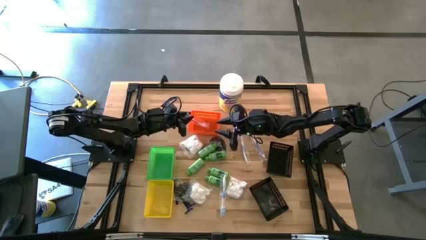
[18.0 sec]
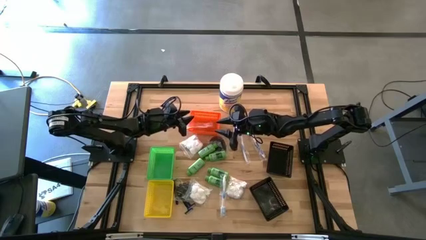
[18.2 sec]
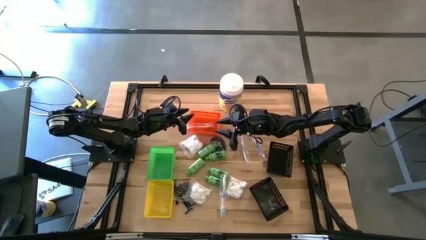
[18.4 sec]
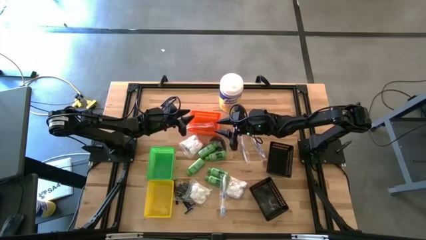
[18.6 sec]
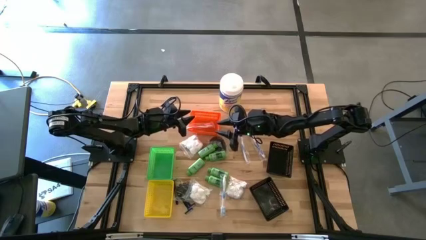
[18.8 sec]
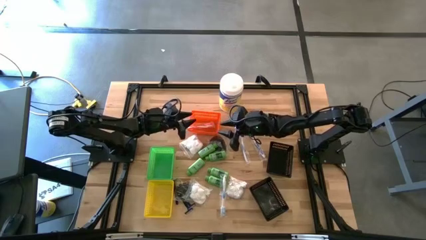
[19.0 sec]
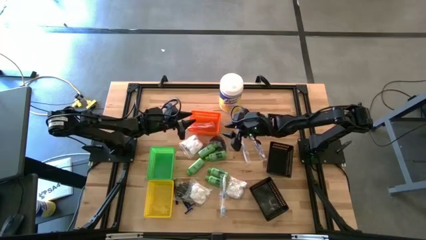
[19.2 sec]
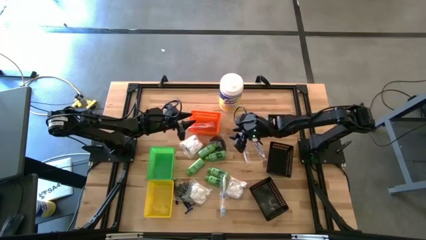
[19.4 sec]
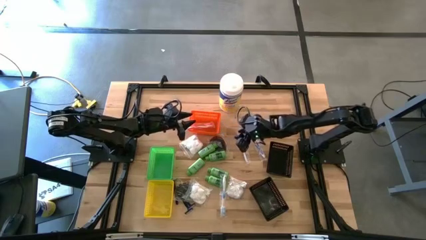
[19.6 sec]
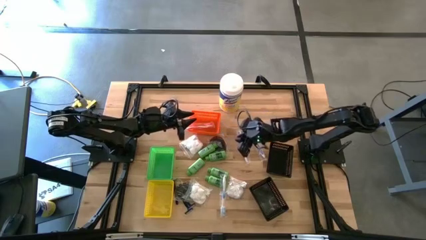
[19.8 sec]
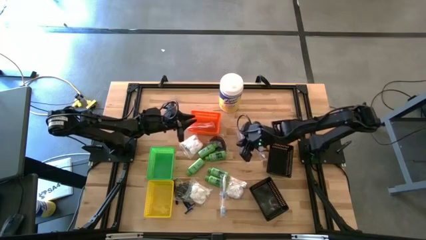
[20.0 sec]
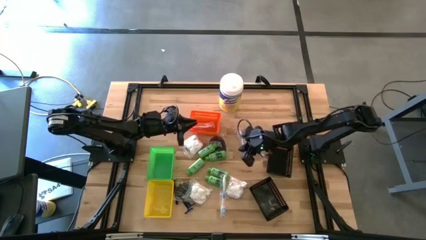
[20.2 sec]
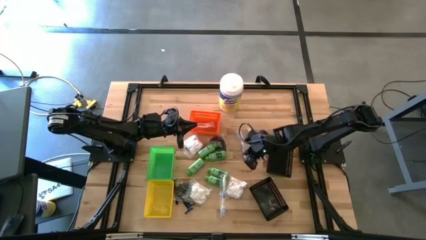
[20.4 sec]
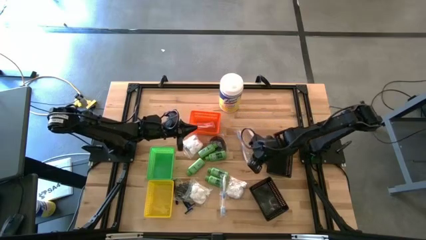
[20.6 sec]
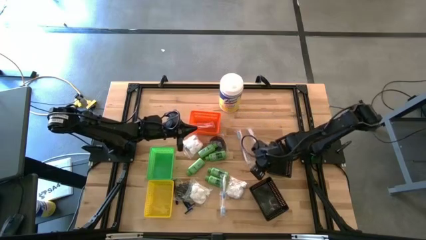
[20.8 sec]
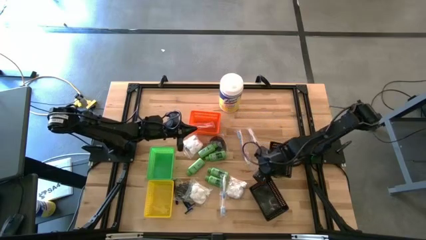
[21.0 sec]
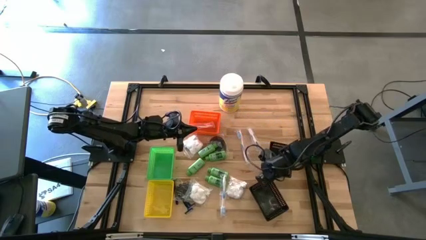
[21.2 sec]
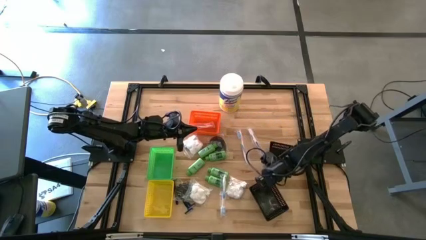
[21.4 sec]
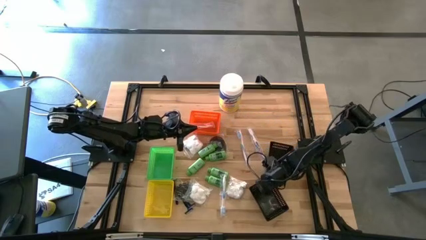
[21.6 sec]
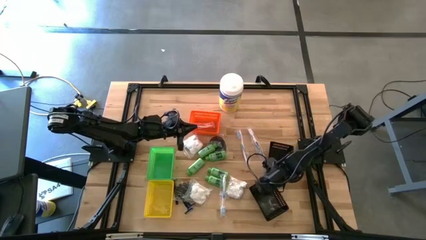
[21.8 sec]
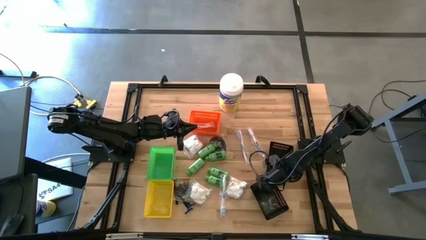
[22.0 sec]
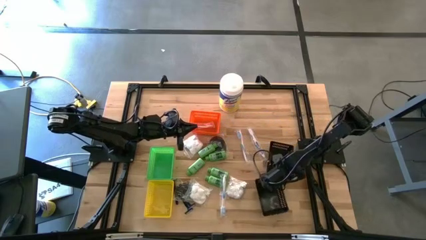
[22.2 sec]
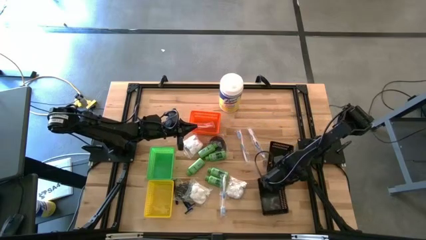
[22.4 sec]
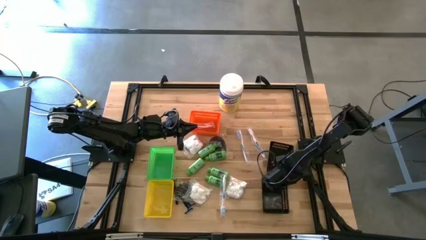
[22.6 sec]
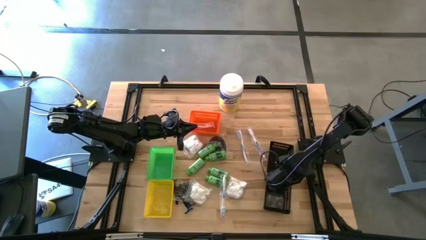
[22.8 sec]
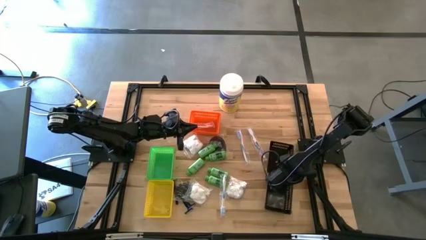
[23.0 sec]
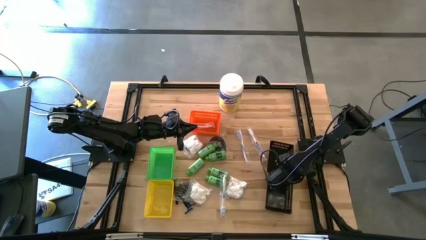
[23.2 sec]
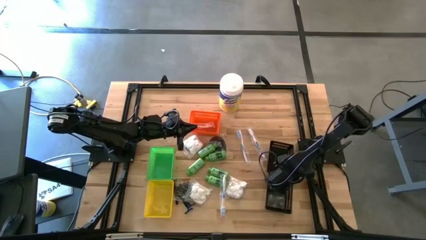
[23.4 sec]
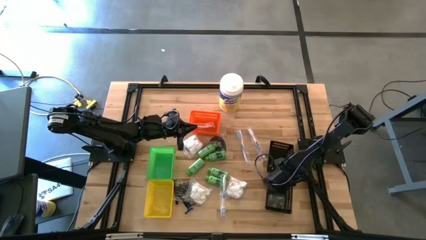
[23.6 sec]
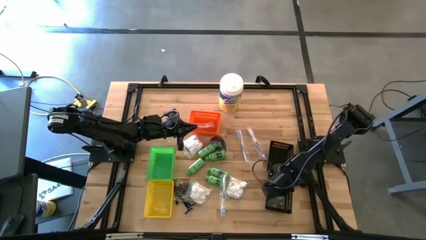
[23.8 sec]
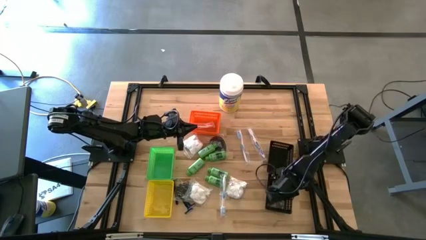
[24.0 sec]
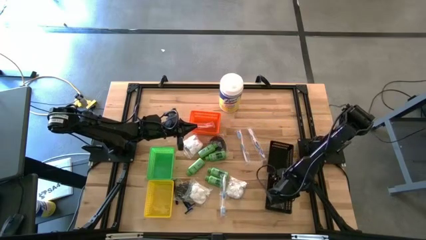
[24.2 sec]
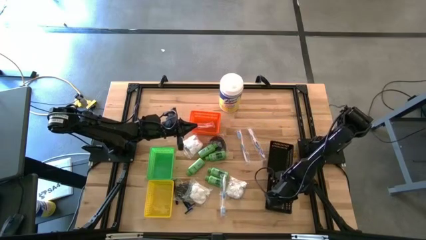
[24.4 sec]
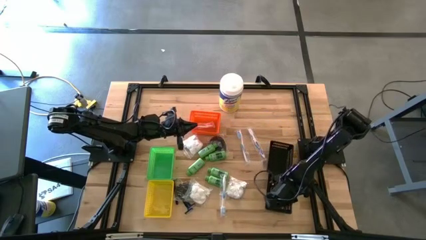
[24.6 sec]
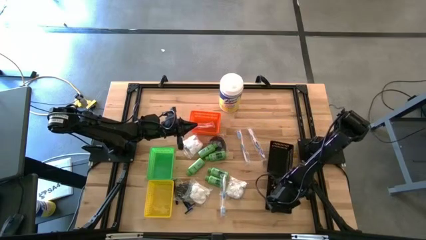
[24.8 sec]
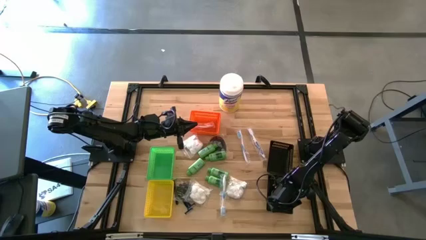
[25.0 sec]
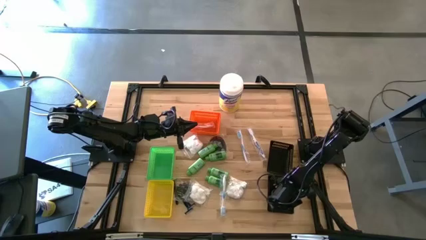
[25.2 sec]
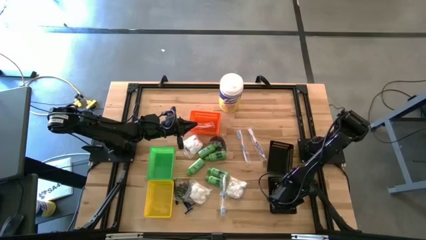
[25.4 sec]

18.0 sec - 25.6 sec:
Task: Pick & Place Travel size toiletries
Adjust the bottom black bin on the table

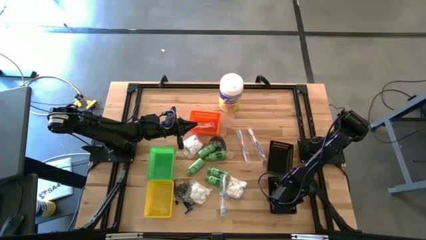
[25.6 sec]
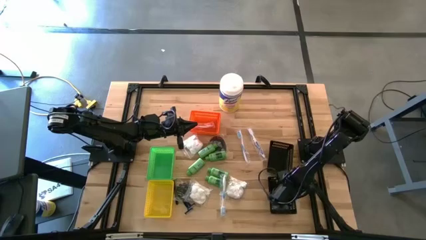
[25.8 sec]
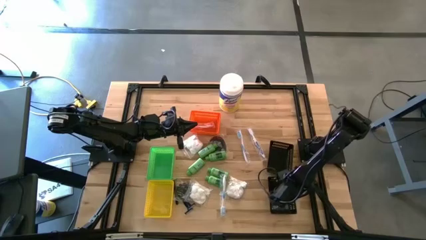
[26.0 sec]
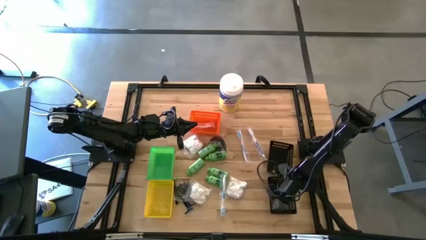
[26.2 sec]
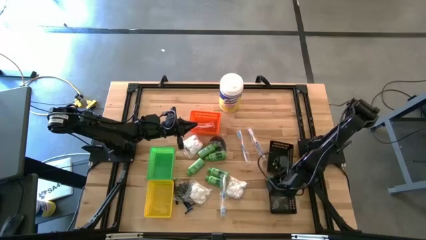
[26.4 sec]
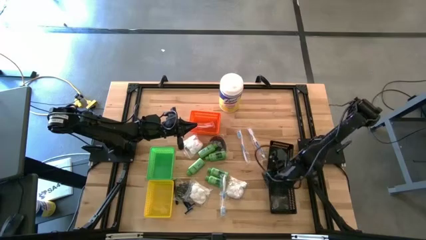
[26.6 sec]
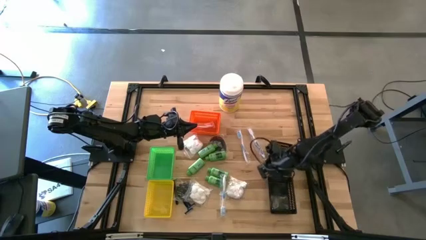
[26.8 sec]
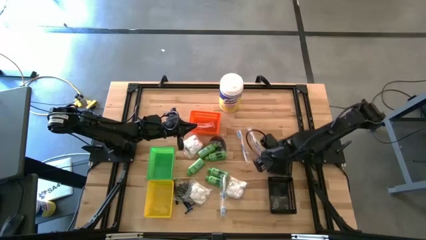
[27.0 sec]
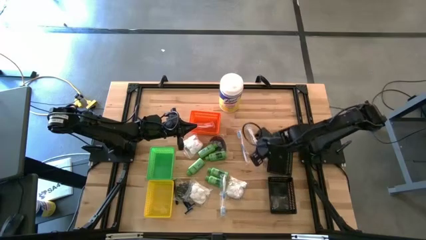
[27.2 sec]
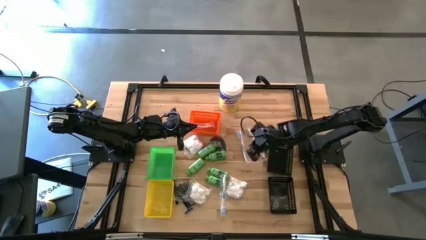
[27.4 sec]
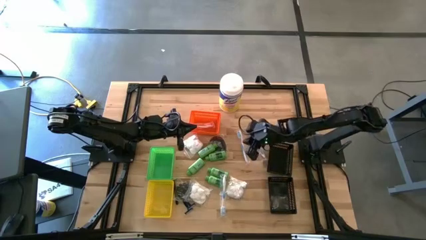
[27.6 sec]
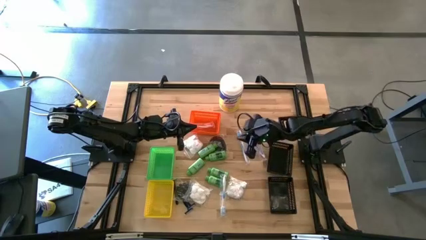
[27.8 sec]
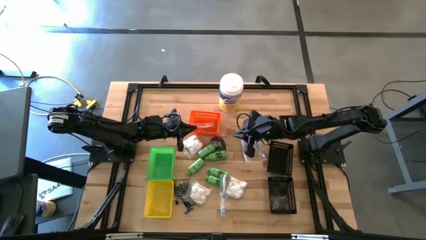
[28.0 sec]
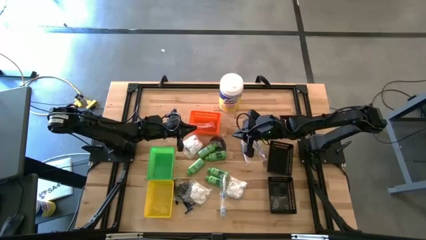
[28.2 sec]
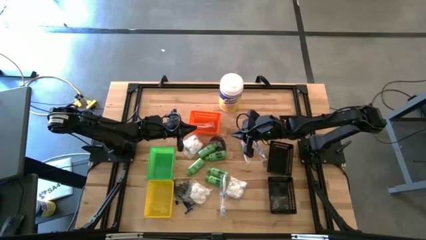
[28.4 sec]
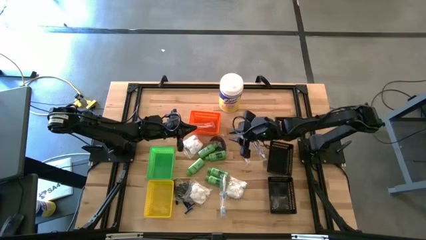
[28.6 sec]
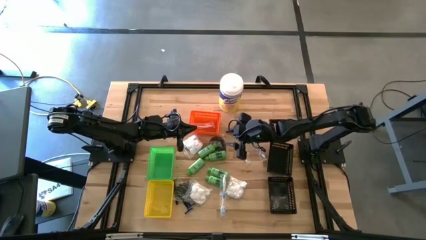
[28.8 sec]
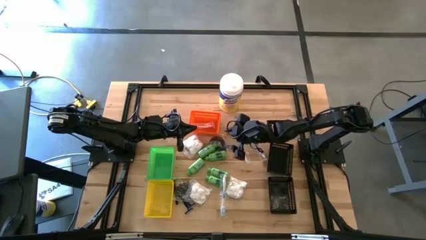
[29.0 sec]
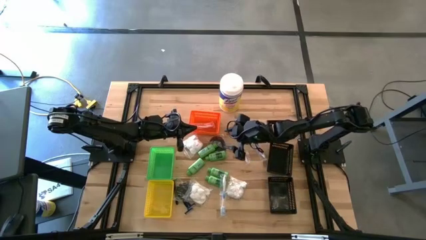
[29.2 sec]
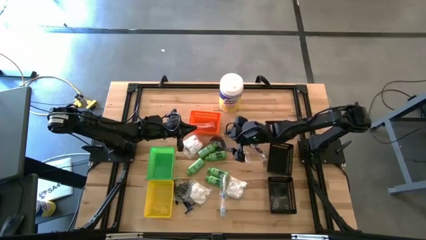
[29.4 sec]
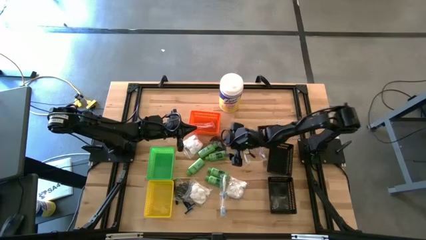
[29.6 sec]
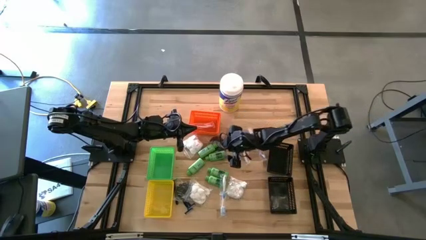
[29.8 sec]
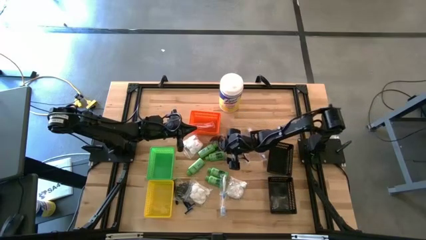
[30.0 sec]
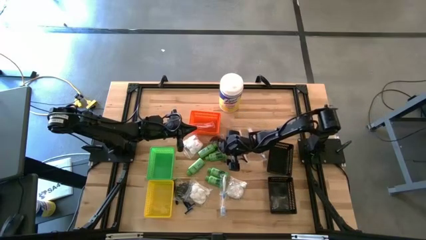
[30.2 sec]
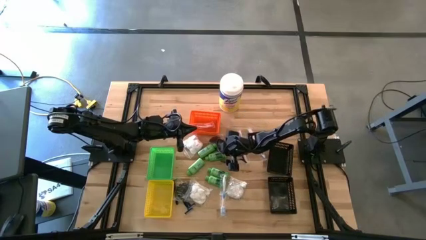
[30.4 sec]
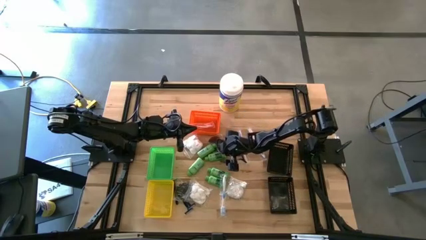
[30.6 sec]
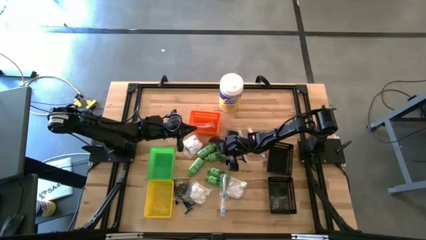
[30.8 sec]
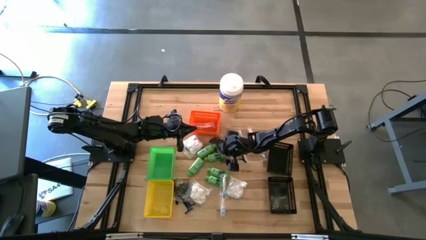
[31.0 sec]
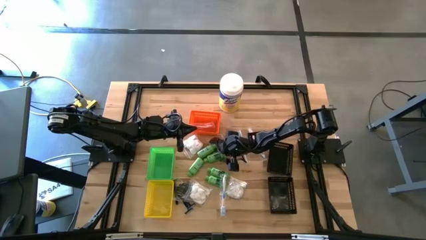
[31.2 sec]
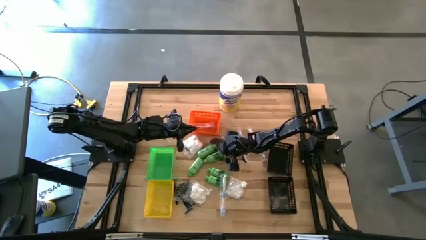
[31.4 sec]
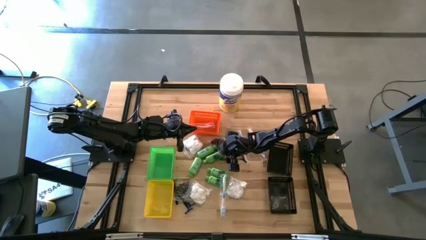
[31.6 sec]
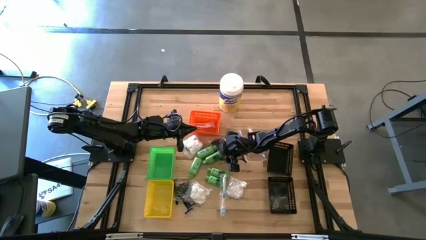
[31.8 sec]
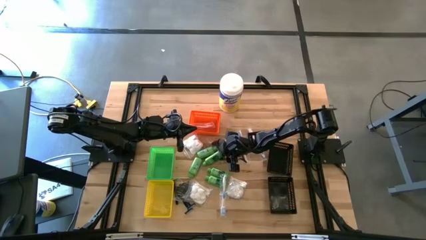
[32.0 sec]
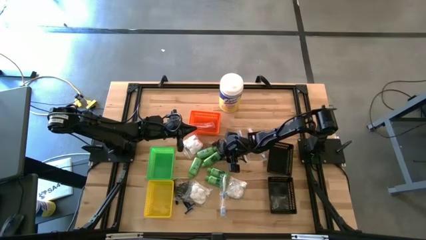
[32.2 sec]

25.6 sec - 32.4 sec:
Put the green shampoo into the top black bin
